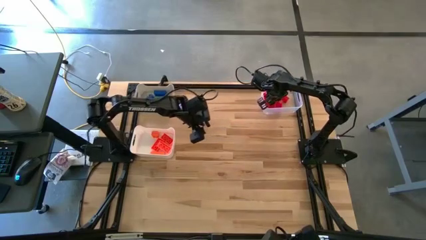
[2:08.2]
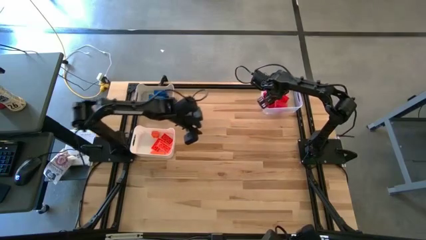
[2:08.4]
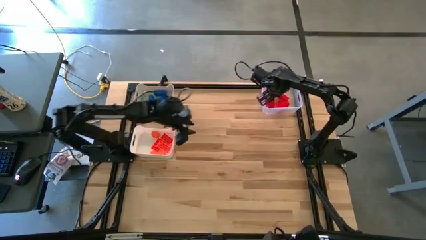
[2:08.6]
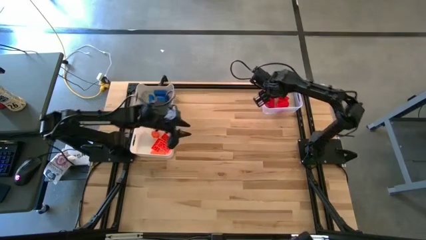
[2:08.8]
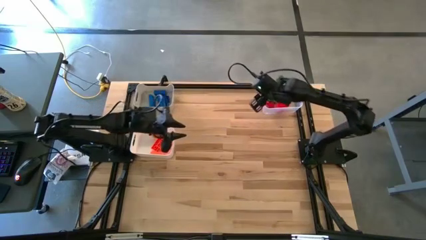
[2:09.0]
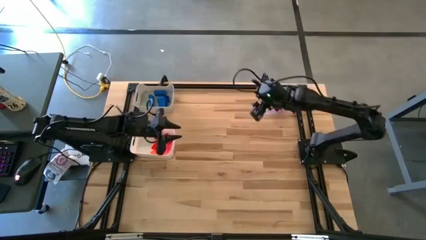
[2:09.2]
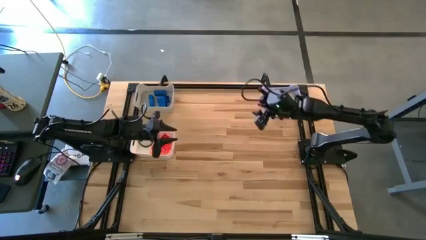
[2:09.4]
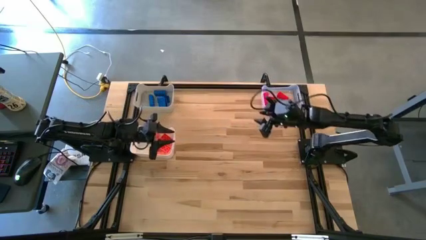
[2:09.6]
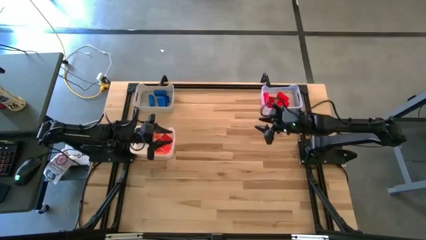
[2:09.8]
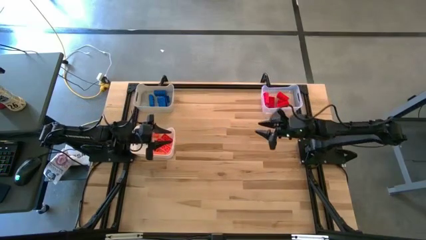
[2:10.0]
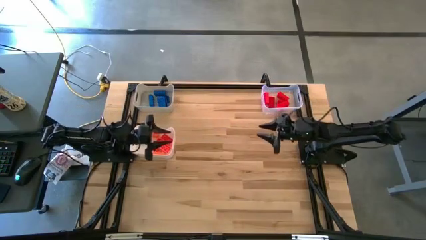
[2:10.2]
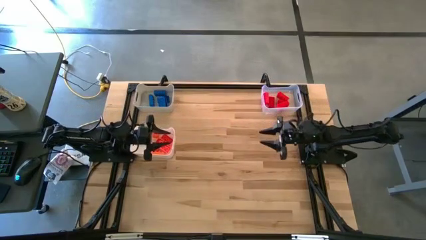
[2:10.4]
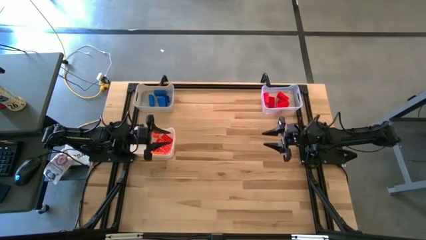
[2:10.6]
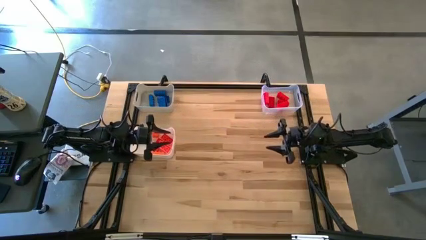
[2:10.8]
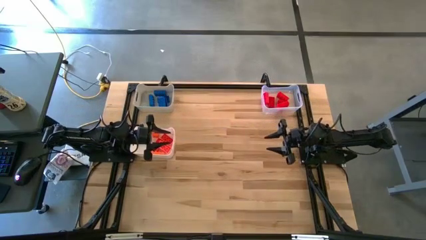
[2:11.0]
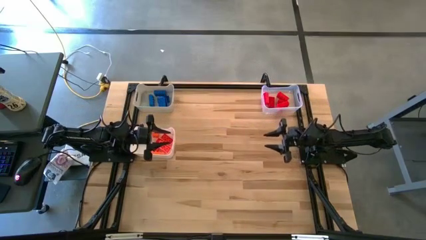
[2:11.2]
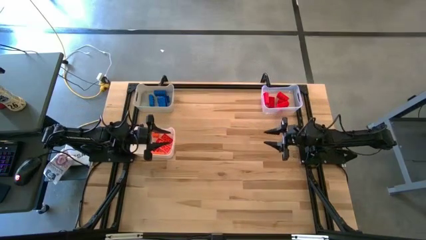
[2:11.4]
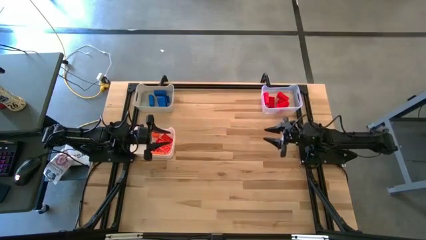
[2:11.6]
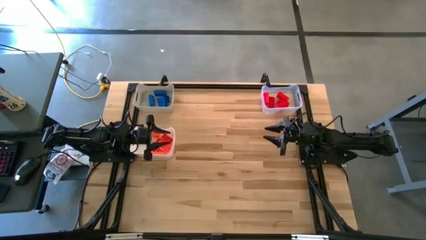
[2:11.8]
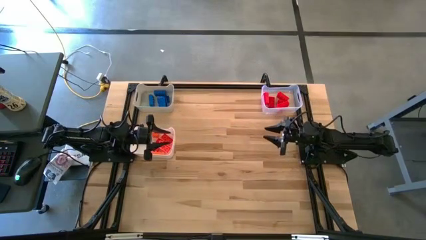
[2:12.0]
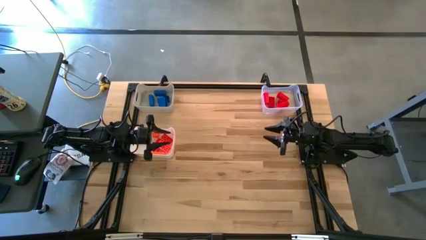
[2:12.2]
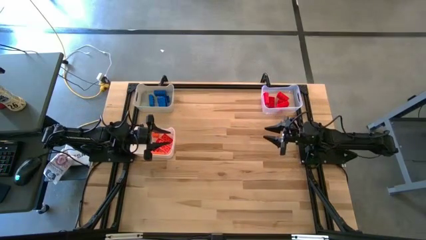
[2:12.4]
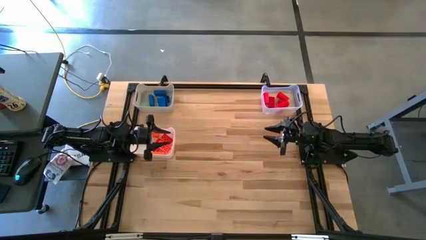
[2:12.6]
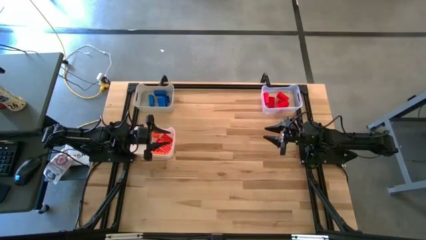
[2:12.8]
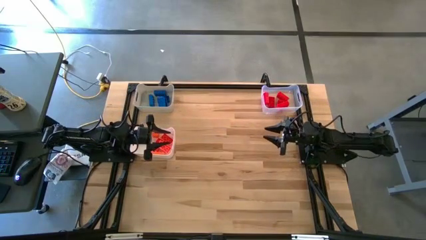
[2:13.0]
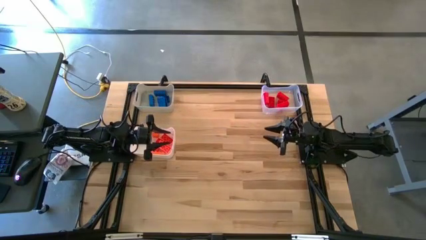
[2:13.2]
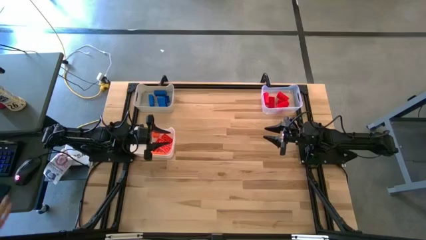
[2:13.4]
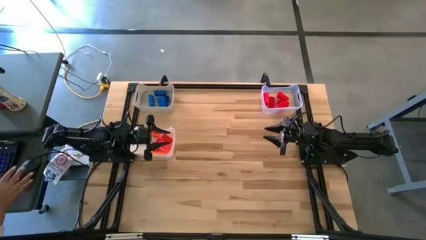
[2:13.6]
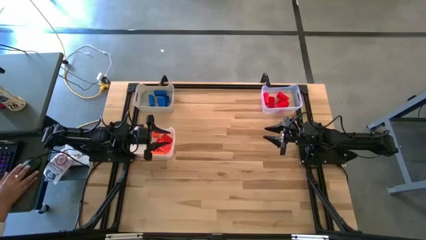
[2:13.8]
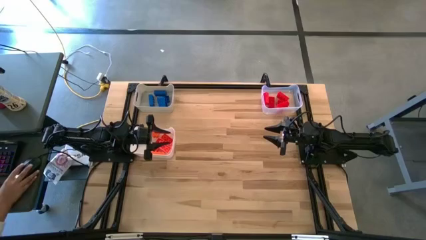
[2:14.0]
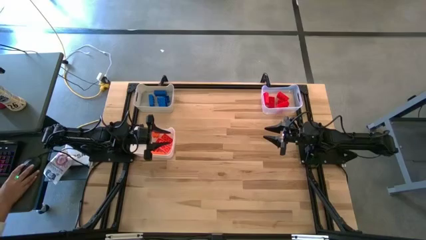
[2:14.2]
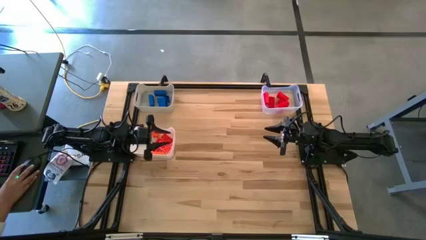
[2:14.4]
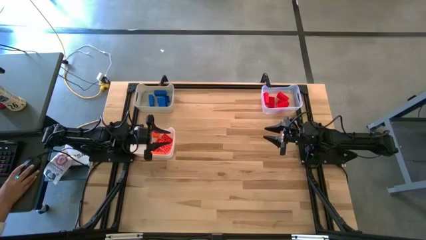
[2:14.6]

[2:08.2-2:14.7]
Task: Sort & place blocks by color
Return to Home Position

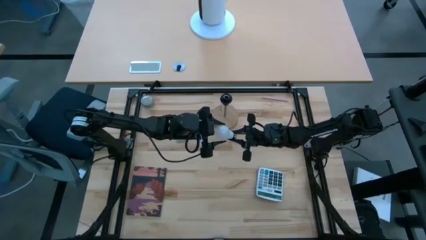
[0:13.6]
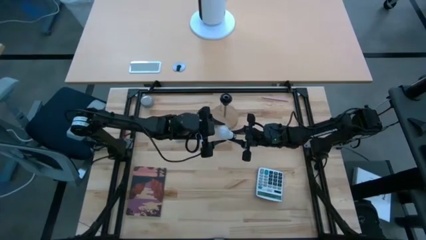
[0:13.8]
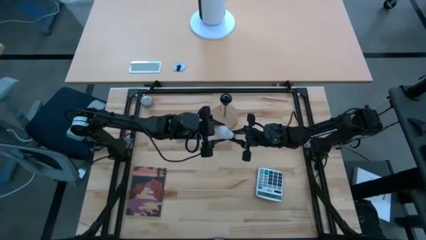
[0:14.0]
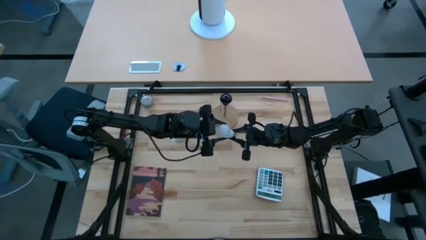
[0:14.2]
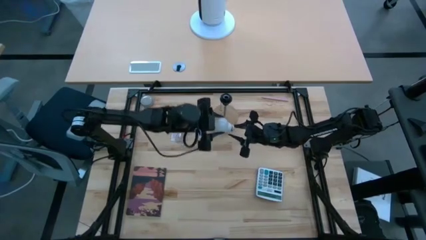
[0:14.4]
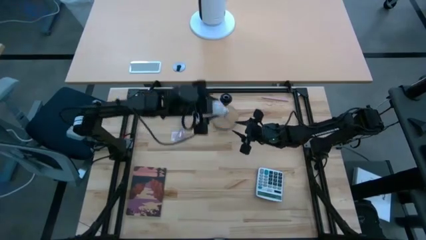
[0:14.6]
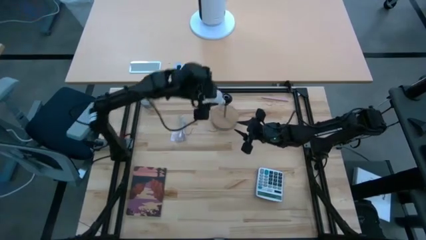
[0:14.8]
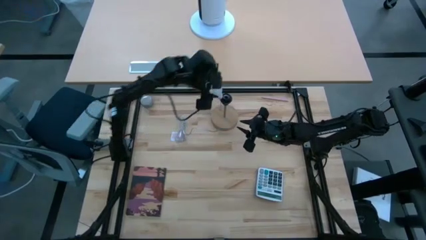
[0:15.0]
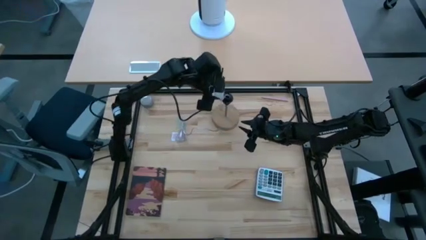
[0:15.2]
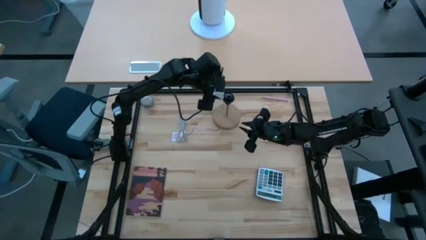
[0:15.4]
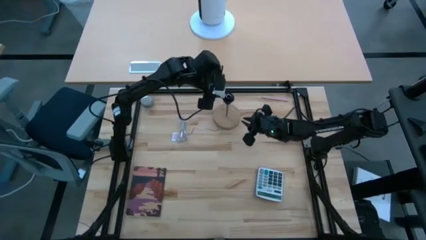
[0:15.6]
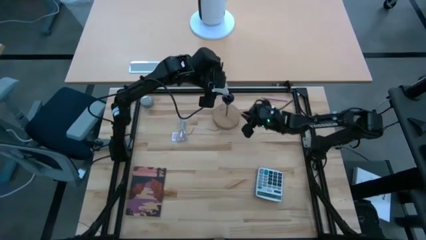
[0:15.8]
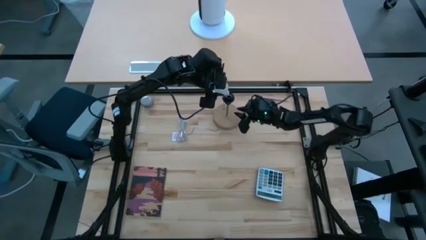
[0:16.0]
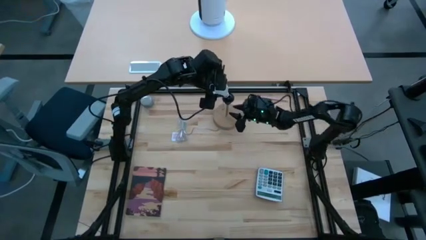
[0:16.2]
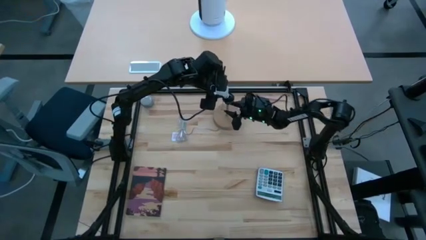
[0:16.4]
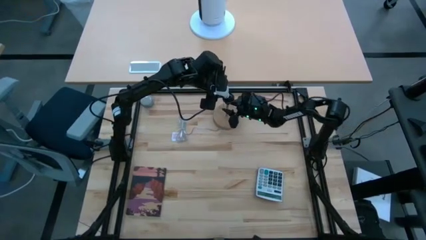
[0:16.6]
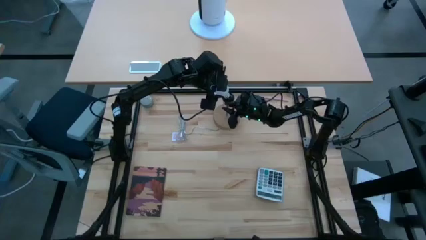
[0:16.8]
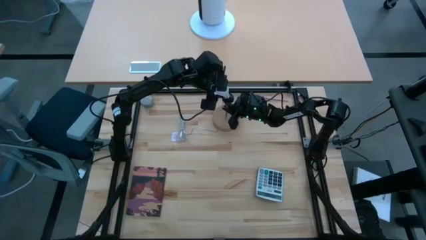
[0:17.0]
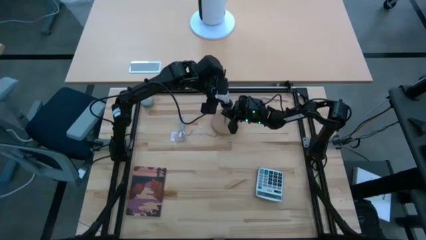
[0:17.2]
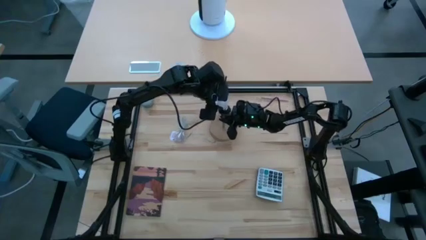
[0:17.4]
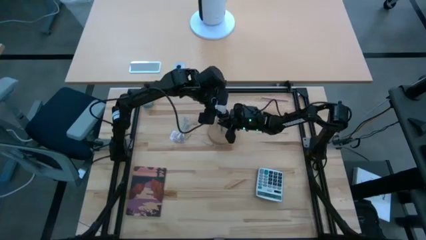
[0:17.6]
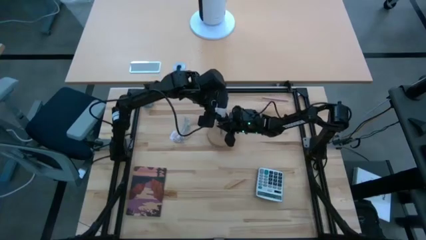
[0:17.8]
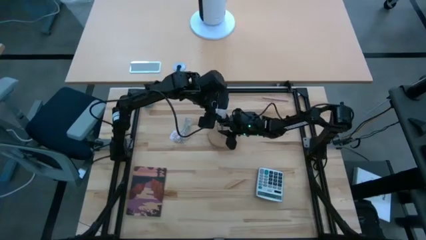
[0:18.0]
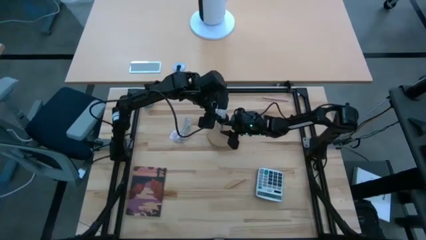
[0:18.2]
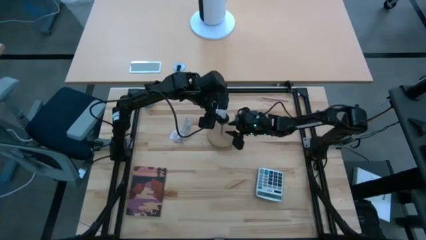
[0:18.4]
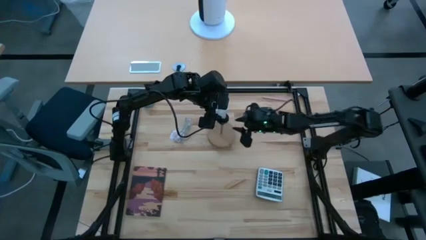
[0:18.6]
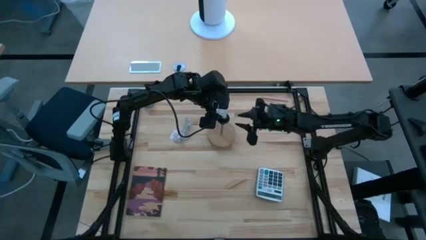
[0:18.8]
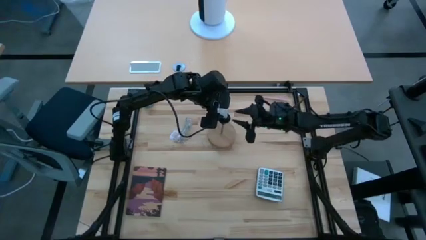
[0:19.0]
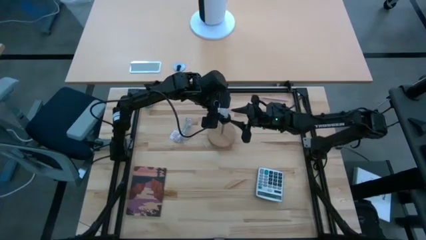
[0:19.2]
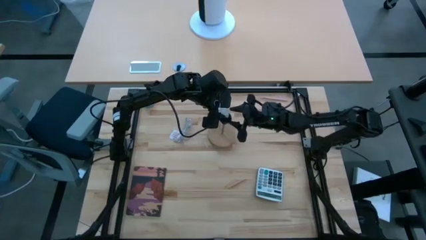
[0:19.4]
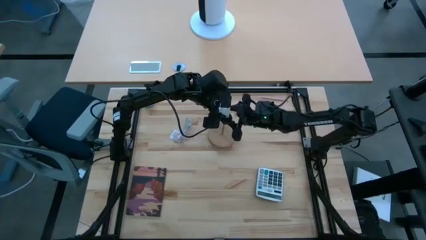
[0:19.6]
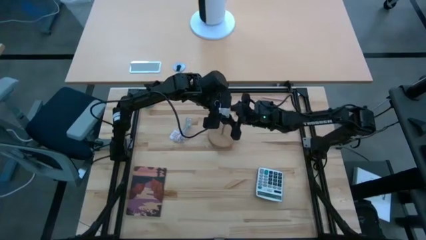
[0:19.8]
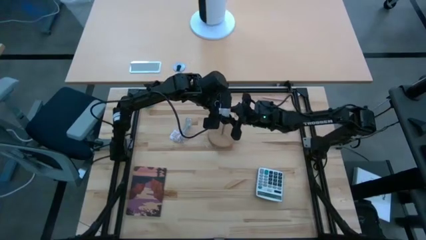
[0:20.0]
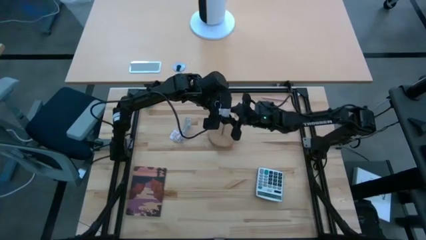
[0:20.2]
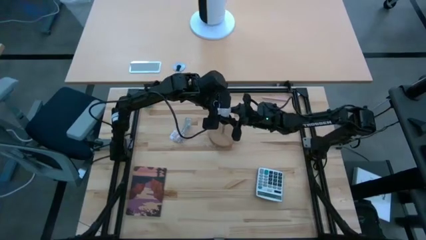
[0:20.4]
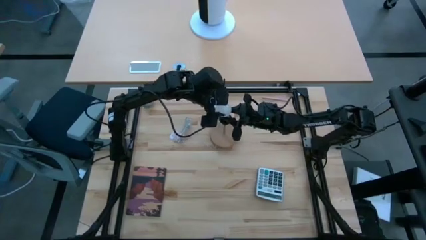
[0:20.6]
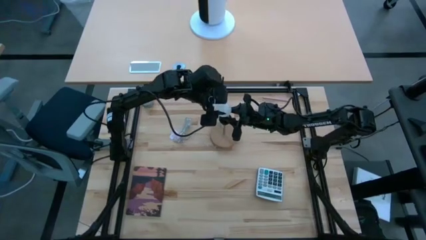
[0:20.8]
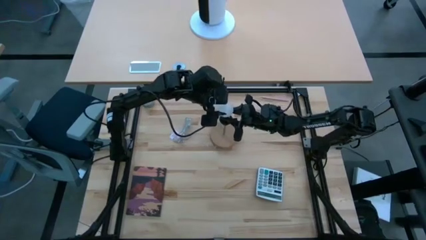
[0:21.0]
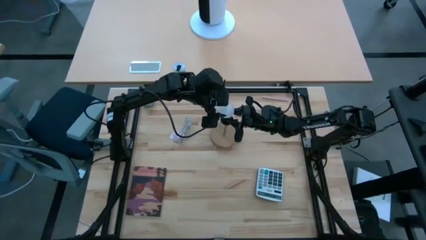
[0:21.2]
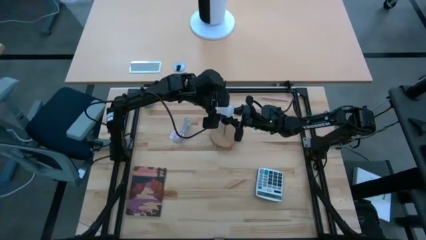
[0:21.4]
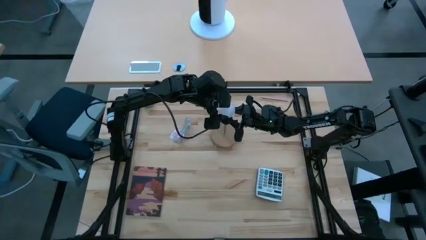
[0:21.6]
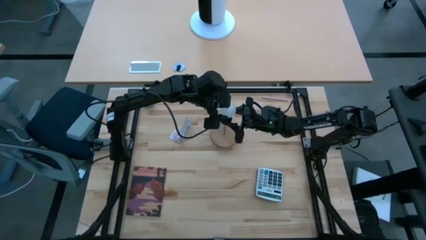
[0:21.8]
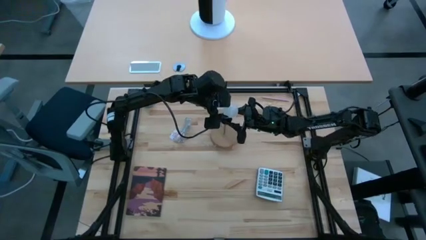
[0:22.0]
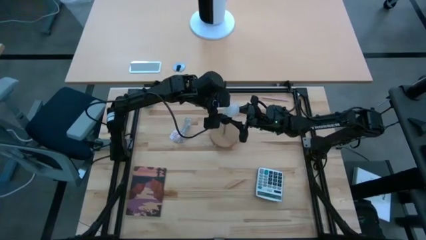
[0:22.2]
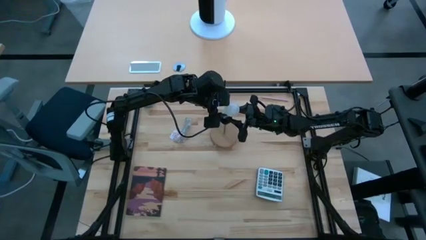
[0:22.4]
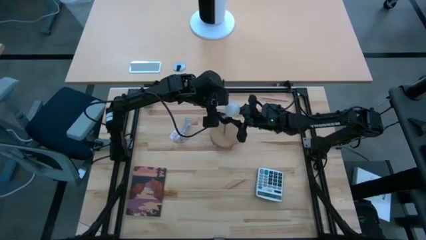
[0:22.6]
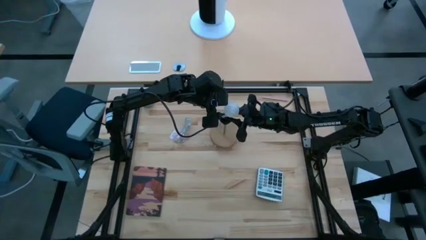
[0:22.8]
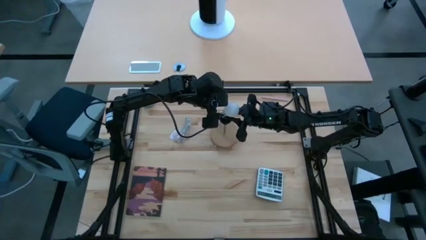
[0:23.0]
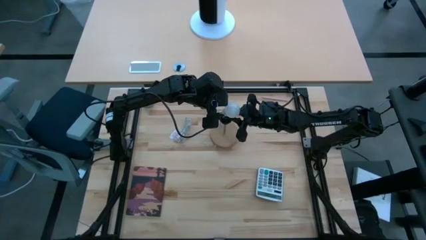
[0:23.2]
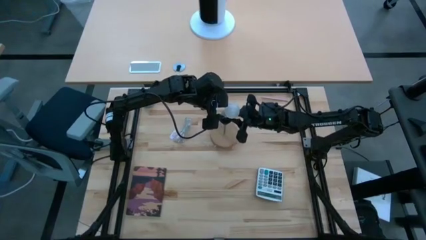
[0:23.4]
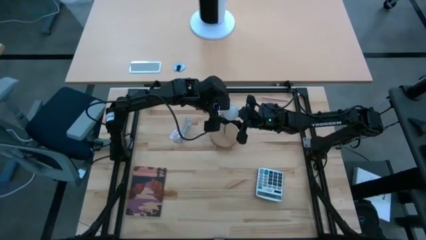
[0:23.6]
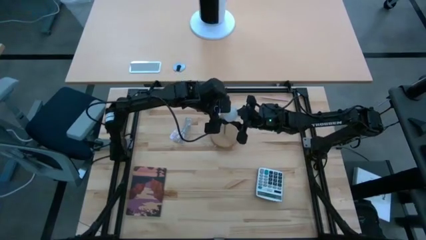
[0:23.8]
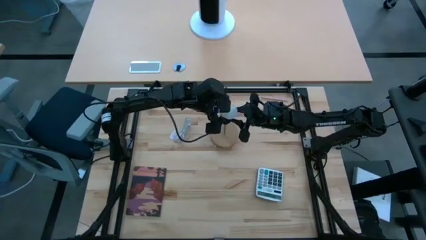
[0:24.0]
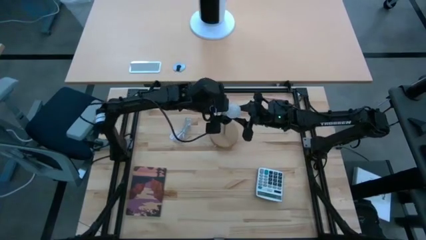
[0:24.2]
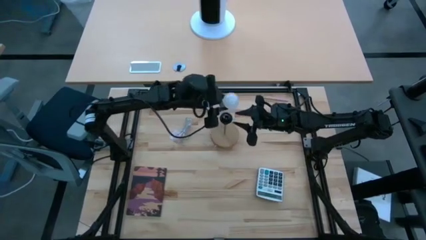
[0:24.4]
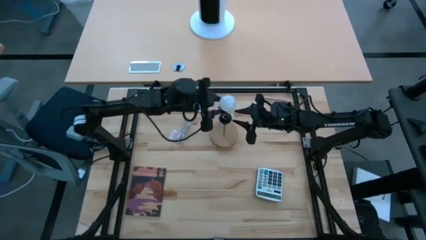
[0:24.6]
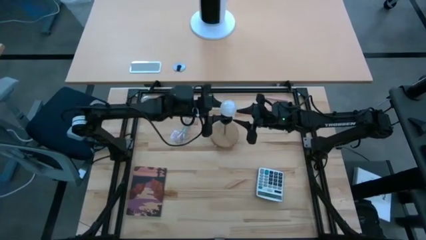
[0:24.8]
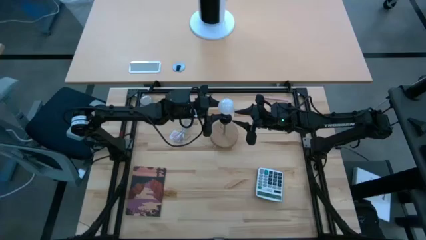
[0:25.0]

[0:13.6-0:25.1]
Task: Screw lightbulb
Insert the lightbulb into the lamp
